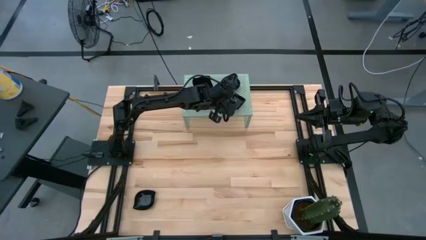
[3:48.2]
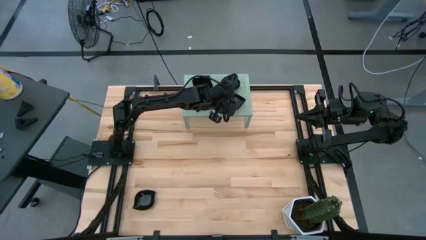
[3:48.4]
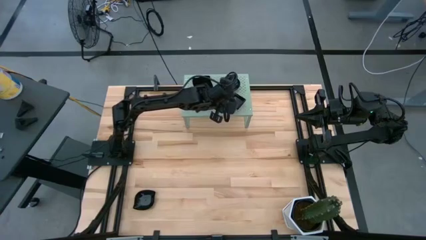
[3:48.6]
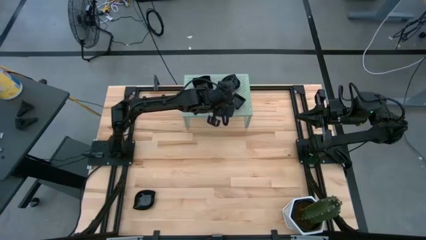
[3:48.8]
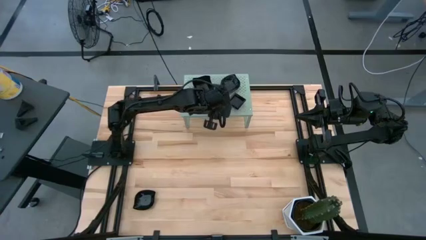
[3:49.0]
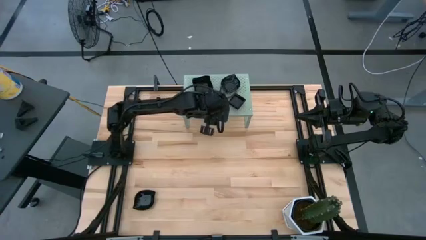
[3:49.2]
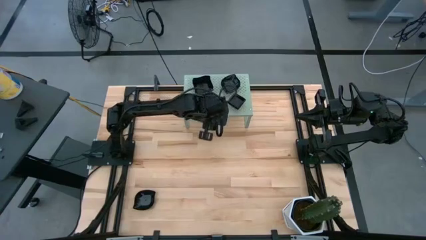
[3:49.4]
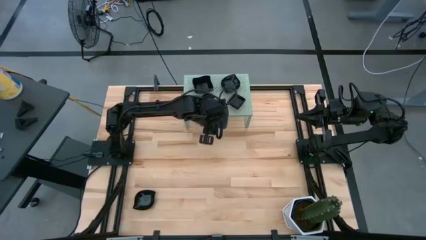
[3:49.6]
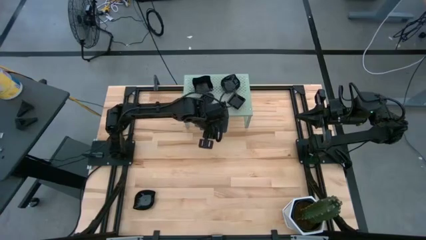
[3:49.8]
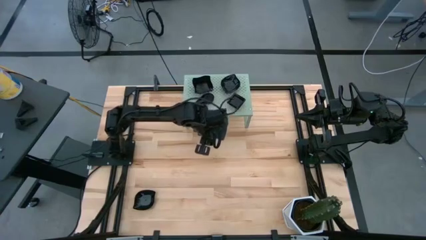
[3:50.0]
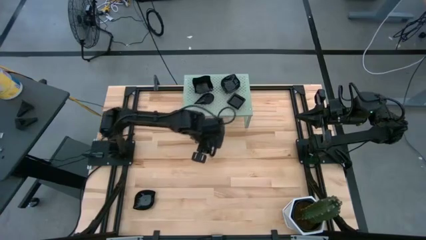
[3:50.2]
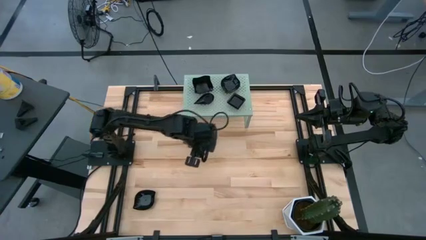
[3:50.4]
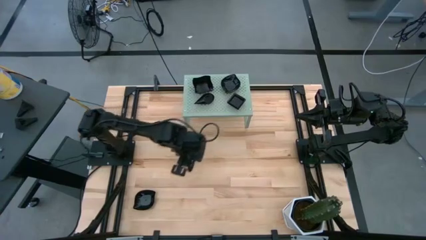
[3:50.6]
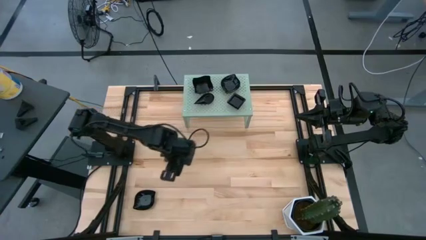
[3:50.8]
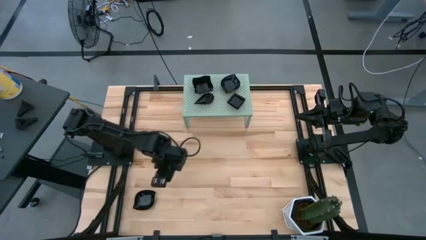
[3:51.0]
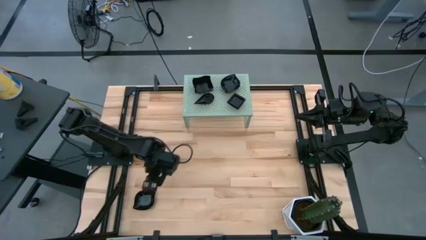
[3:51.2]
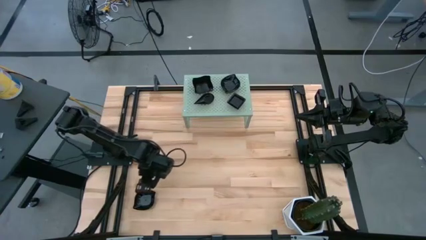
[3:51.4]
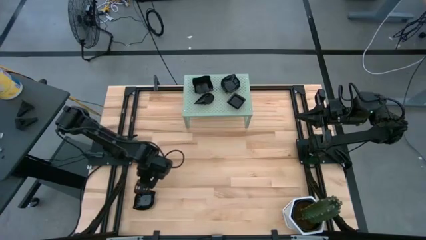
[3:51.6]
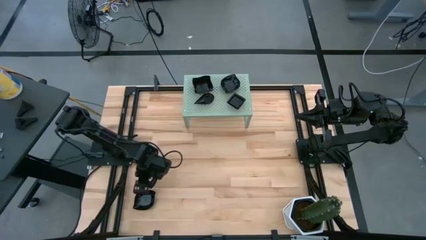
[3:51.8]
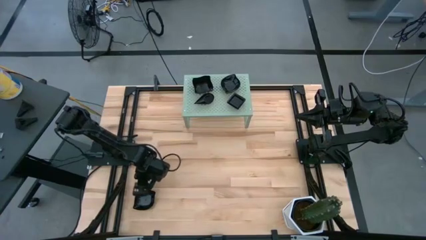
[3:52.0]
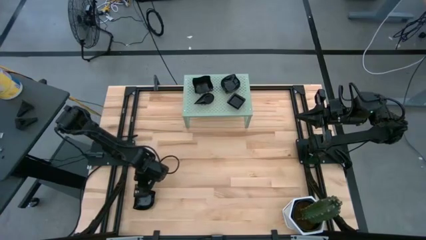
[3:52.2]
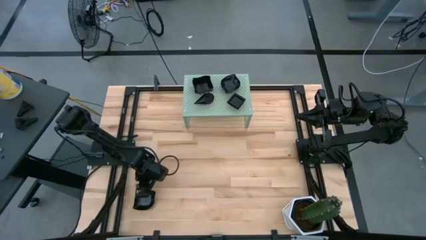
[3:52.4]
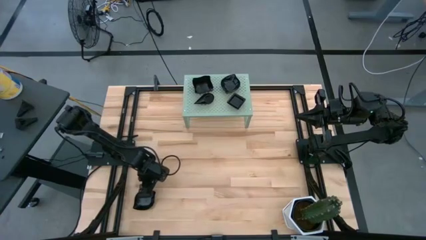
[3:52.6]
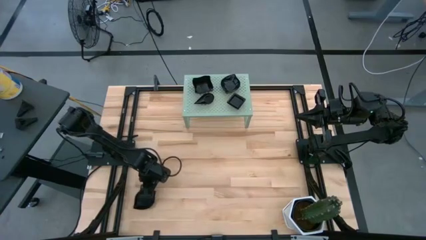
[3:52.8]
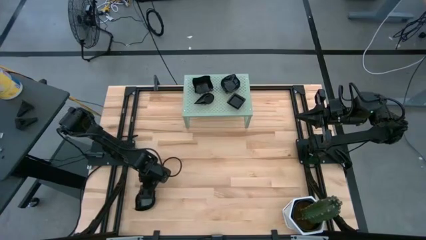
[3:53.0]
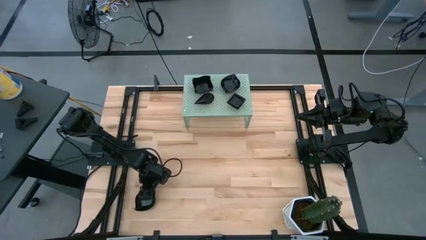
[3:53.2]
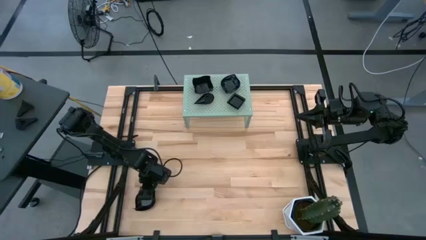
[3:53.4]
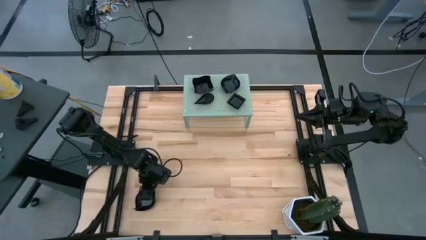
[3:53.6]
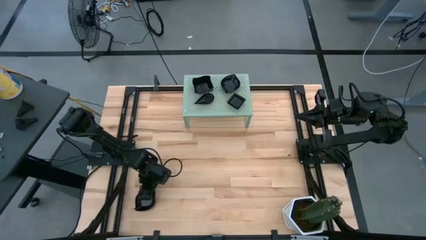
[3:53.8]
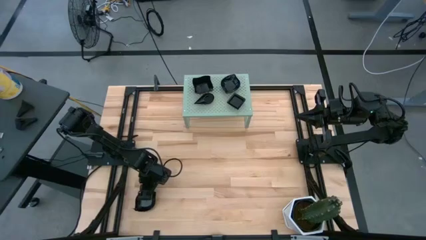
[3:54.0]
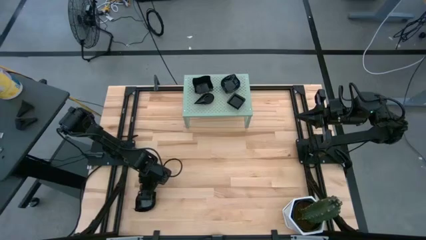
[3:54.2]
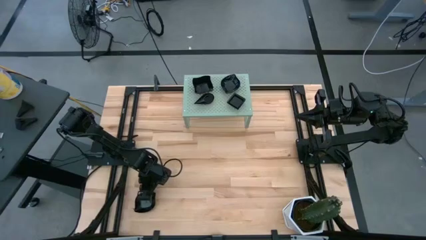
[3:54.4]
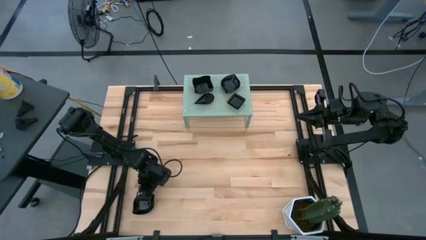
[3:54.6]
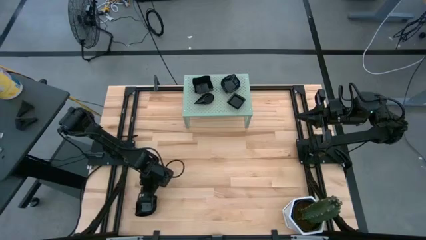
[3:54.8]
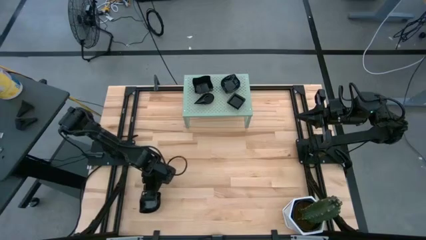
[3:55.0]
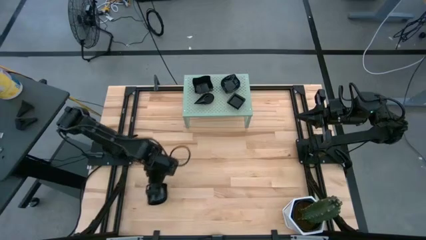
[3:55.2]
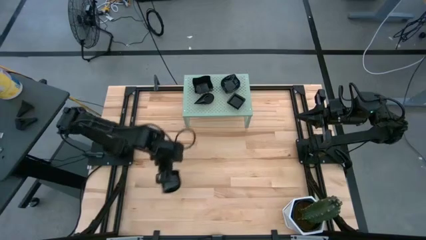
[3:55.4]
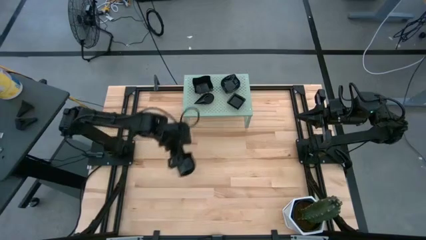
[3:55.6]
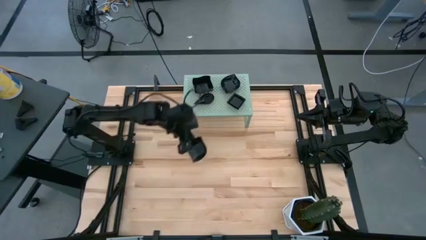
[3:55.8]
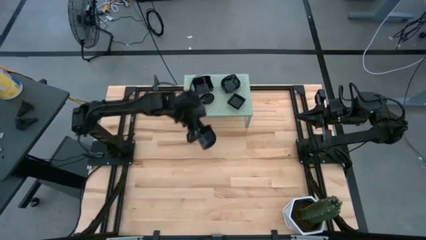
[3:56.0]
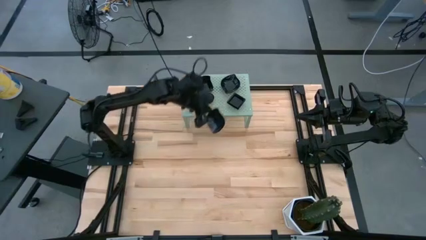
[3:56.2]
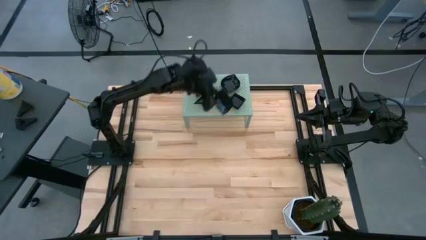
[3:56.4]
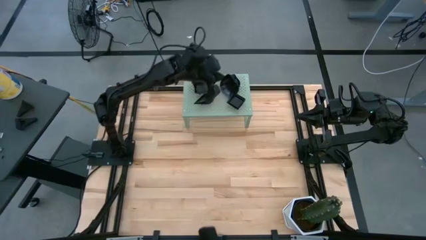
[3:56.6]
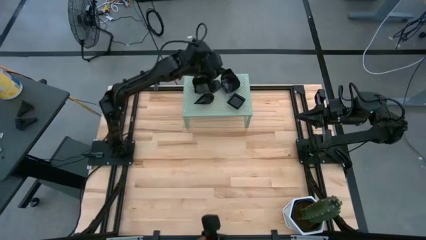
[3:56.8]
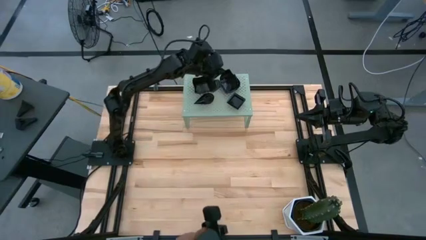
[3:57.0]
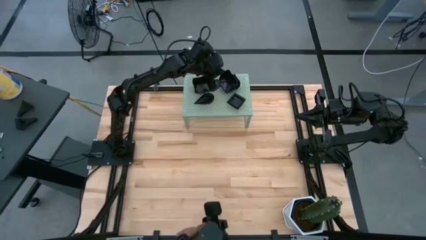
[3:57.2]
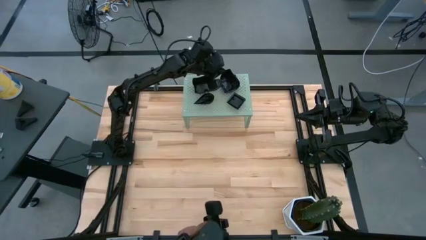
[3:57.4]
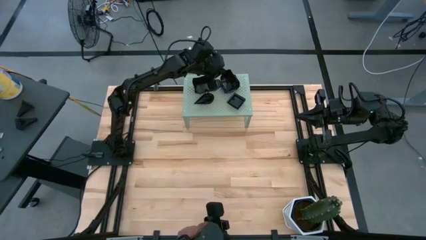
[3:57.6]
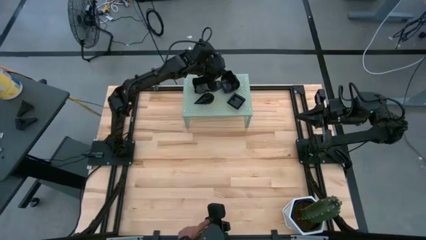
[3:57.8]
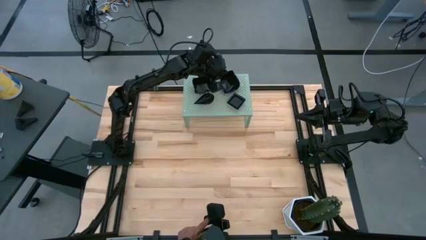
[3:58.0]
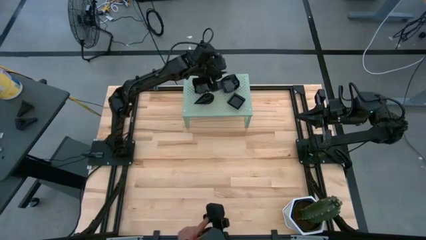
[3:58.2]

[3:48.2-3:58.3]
Task: Pick & Place Mini shaped plates
Stack the leaf shaped plate on top of the leaf shaped plate on the shelf

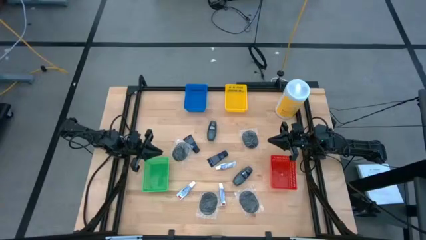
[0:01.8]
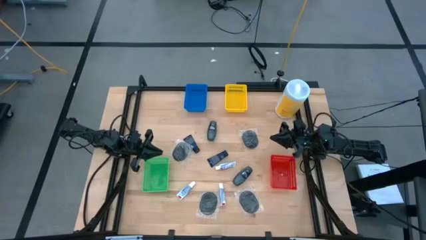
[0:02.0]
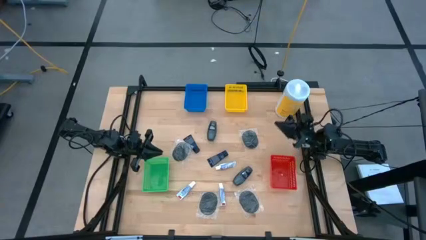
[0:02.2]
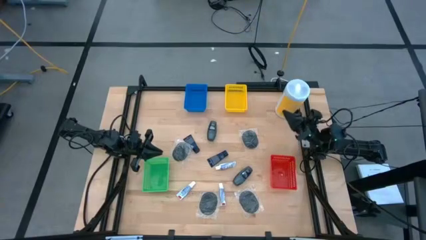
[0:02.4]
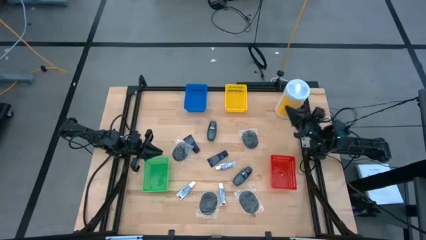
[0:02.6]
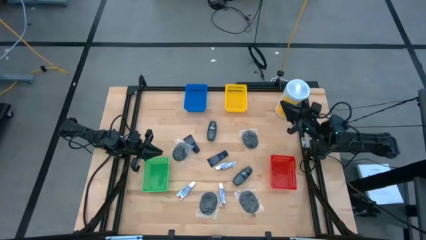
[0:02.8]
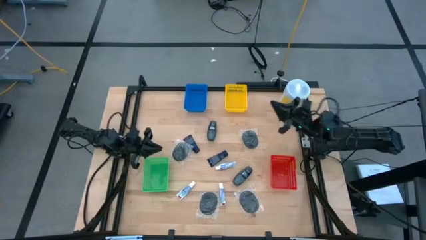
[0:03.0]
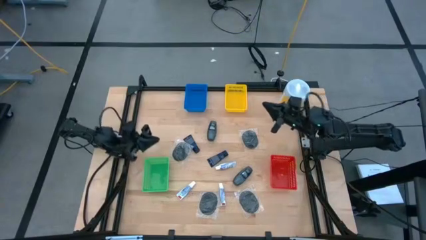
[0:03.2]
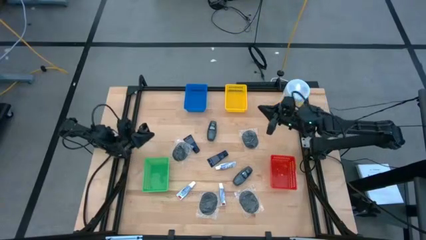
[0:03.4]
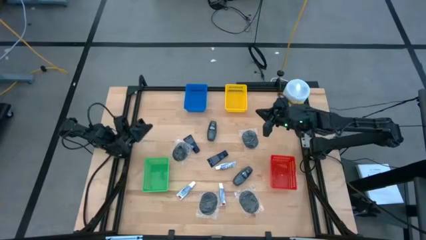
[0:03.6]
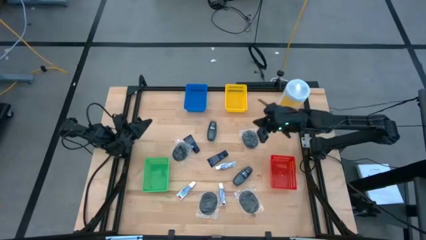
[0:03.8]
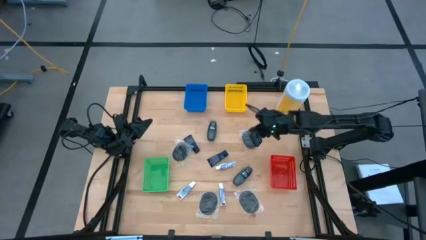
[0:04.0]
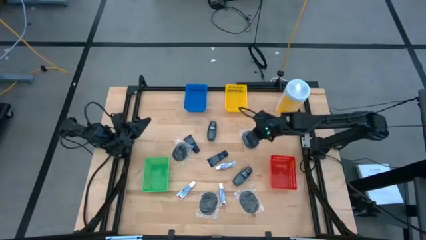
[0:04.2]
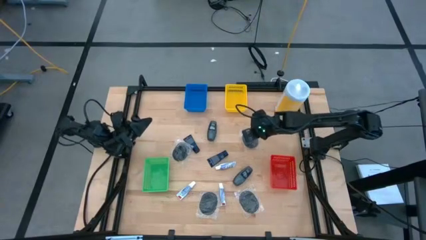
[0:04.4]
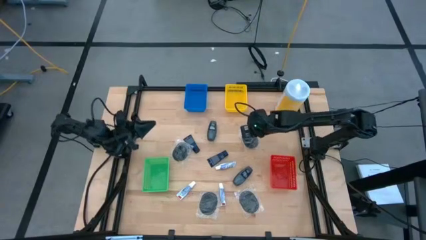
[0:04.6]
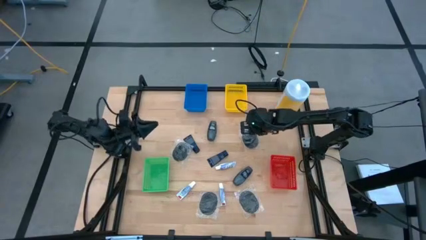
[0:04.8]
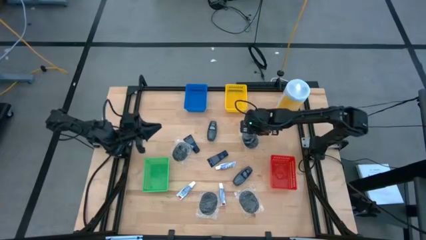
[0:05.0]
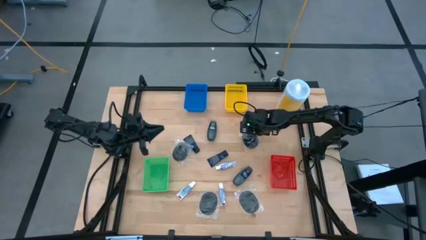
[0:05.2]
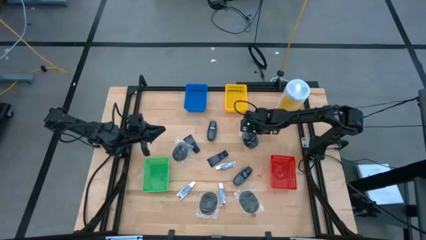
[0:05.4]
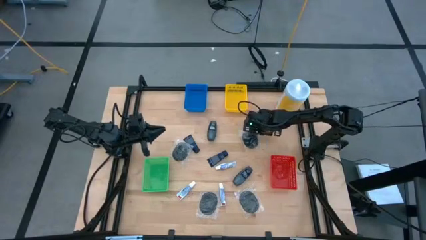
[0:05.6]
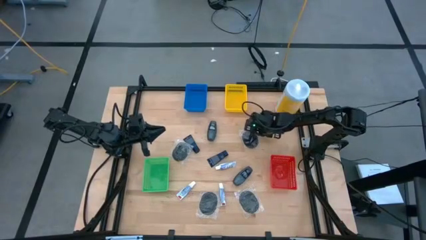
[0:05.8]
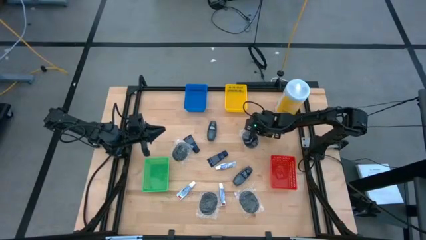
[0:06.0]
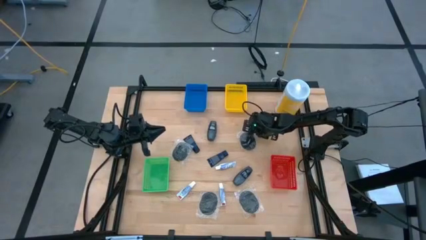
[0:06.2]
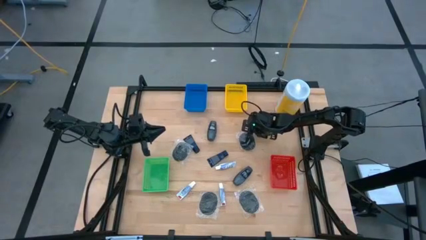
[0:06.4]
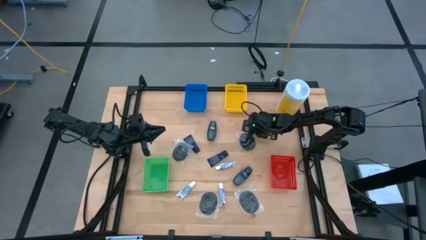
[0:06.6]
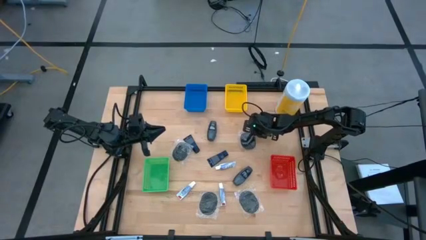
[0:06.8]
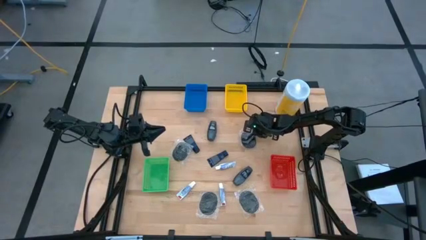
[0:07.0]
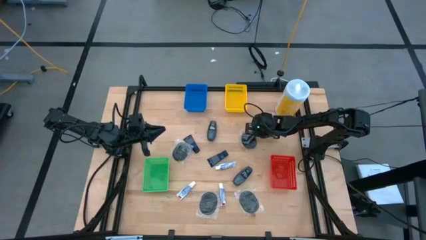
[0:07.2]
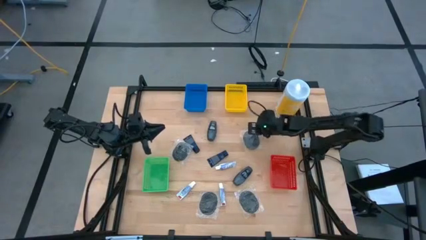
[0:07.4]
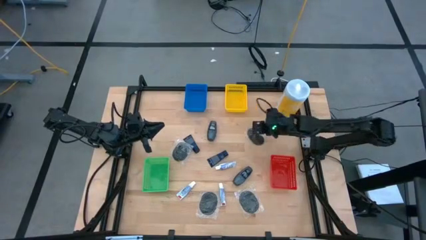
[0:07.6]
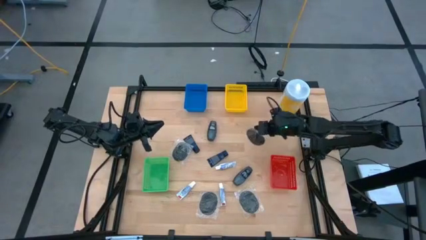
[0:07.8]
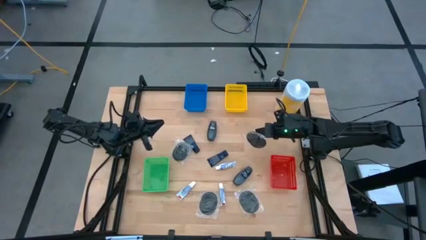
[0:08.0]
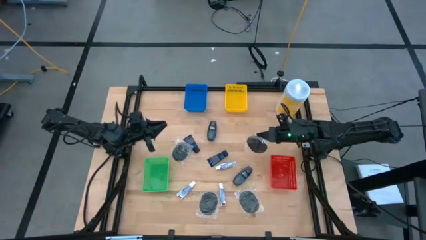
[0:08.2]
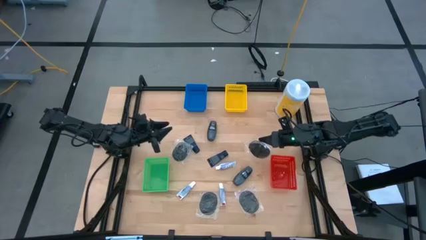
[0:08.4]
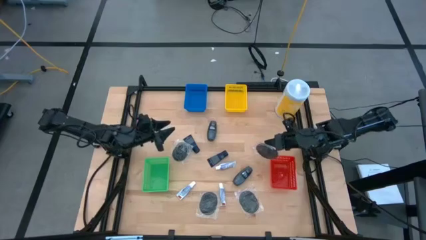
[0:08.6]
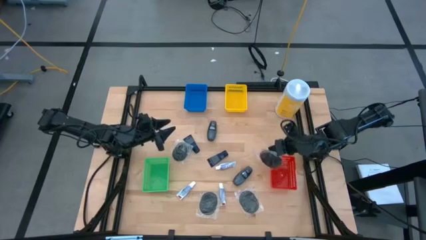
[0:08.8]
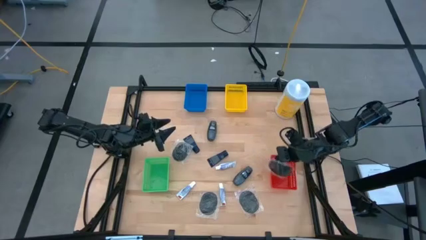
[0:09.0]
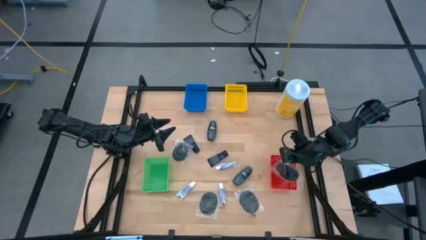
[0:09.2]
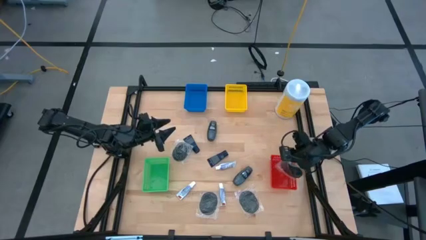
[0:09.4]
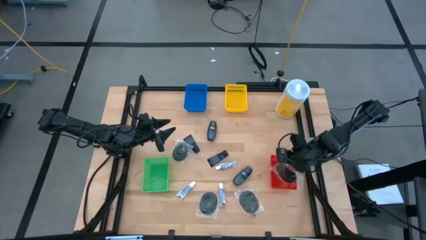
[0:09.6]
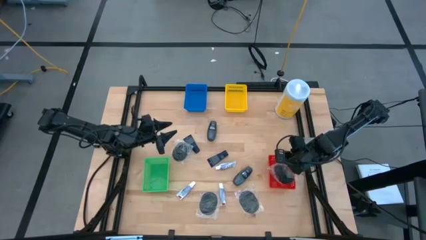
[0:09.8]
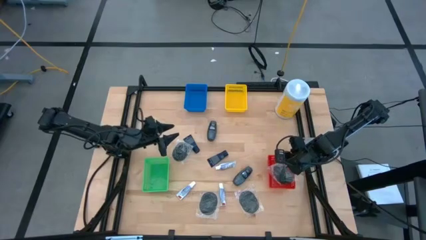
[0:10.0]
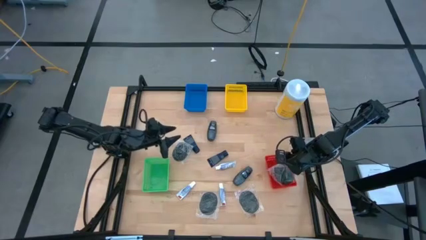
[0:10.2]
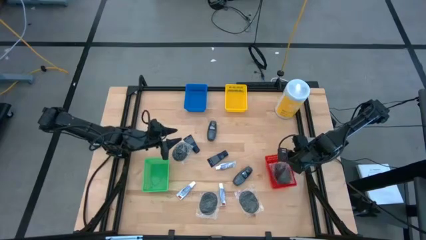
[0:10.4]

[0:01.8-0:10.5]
Task: Pick & Place Travel size toiletries
Put the black hairbrush into the red basket
